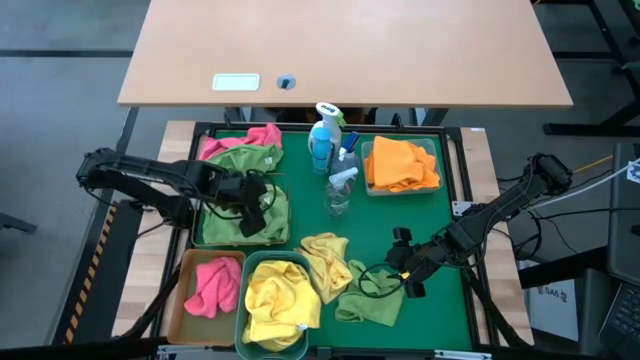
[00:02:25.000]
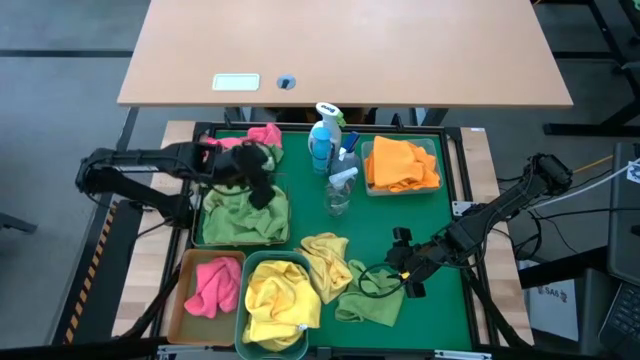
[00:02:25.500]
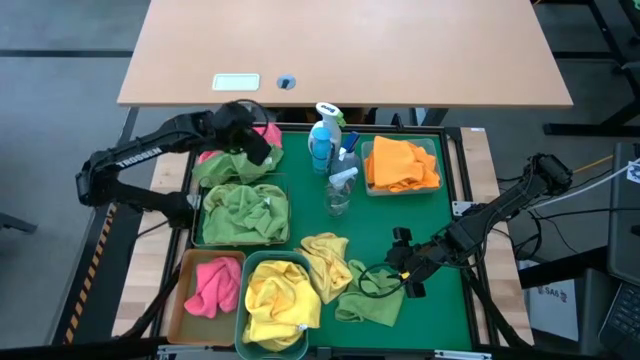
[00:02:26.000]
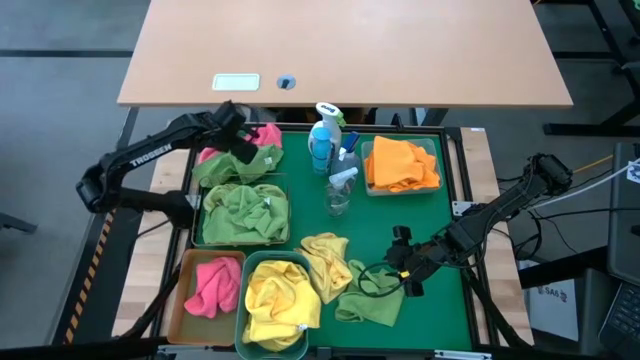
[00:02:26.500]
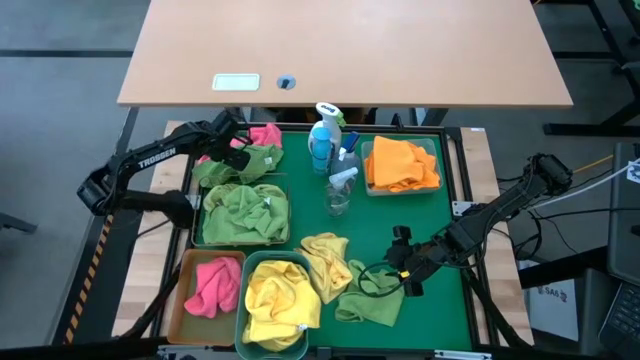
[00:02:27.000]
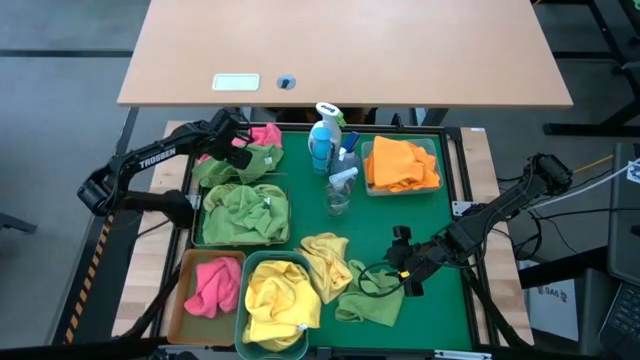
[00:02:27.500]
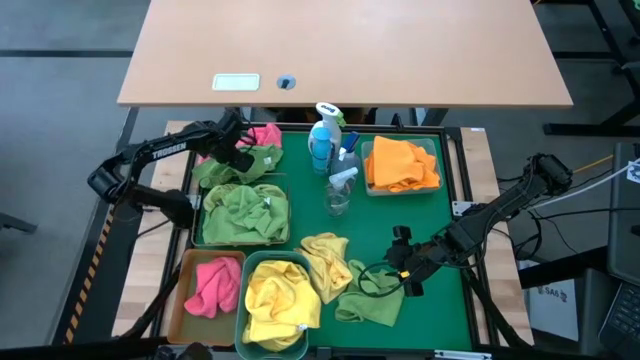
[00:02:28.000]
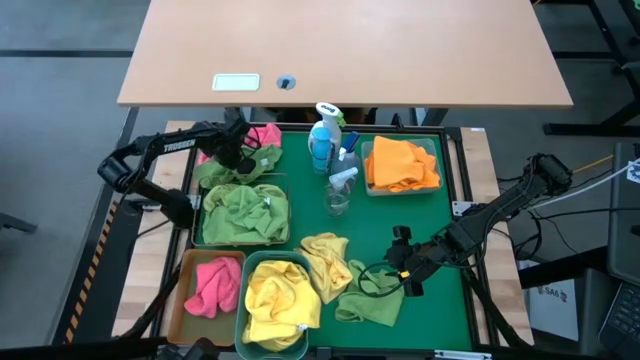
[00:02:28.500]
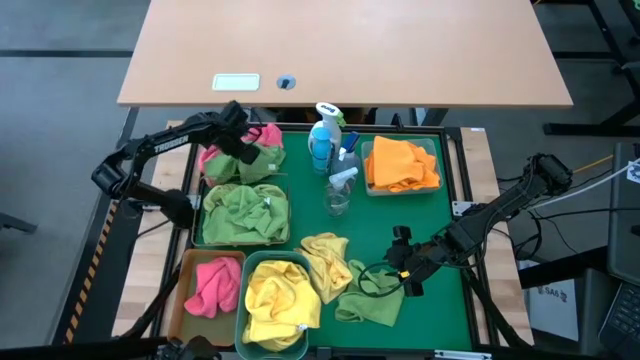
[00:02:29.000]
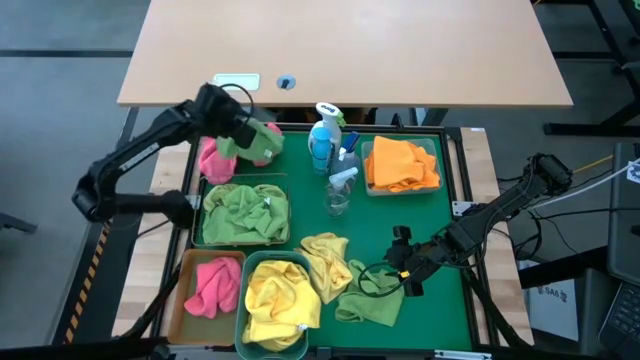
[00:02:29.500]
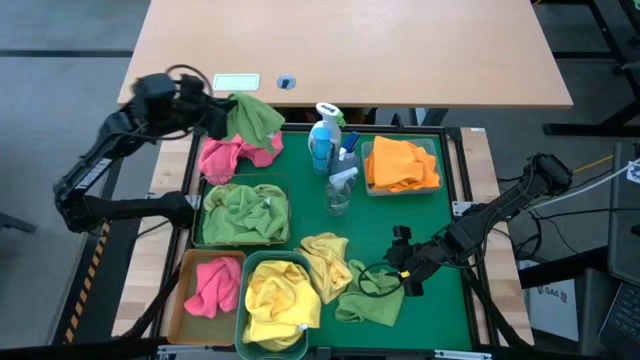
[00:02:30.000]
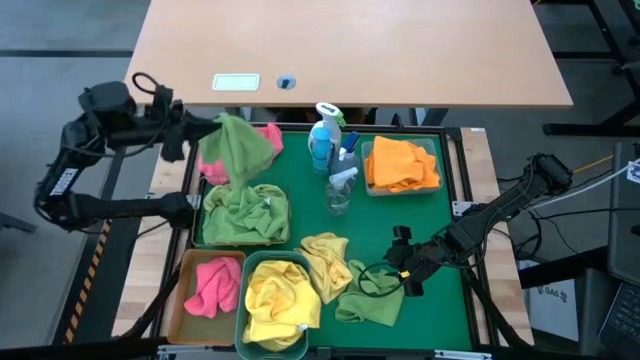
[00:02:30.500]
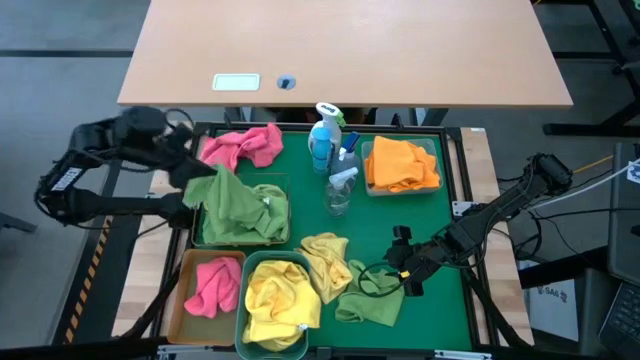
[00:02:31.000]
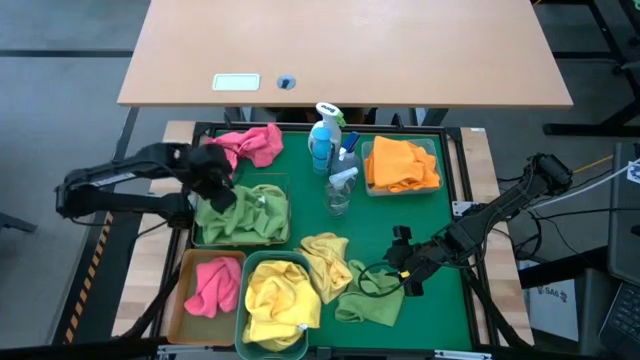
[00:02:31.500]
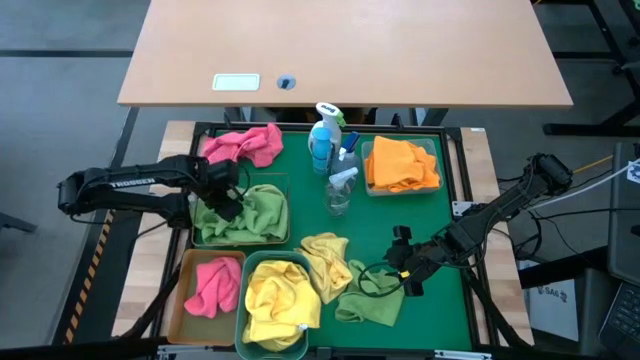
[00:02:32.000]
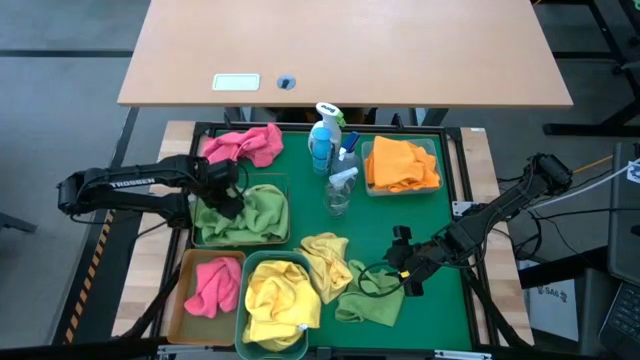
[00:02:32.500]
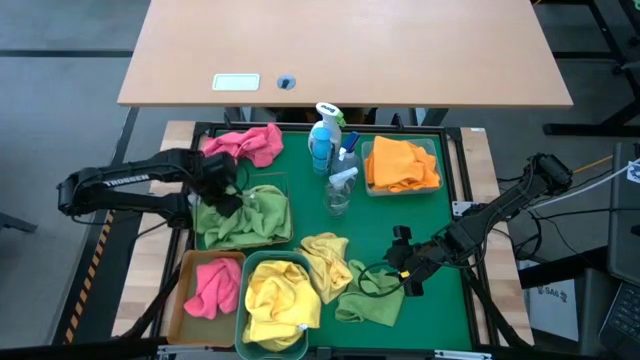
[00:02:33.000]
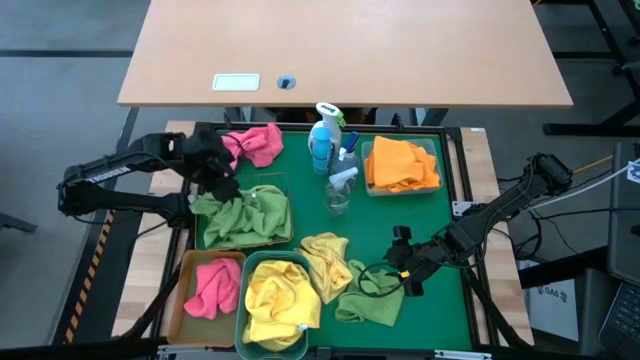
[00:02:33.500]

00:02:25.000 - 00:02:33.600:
Task: Sort microfiber towel by color & place in baskets
Put the green towel into the wire basket

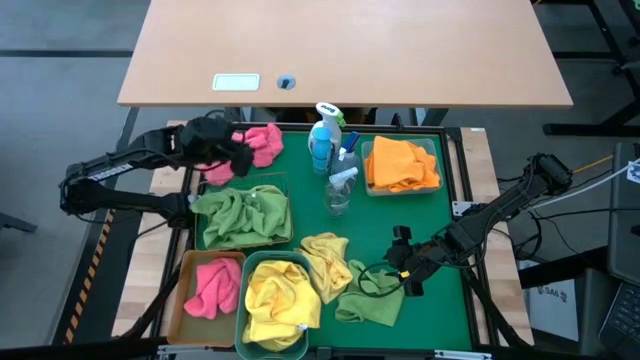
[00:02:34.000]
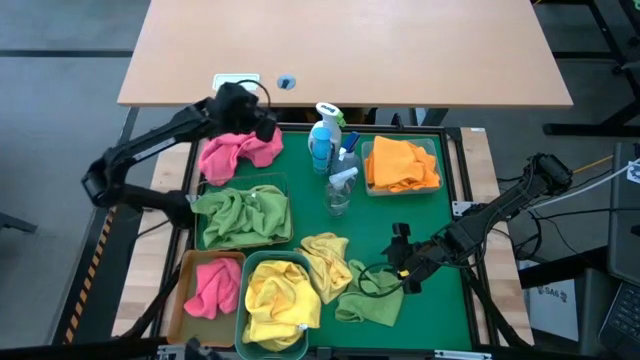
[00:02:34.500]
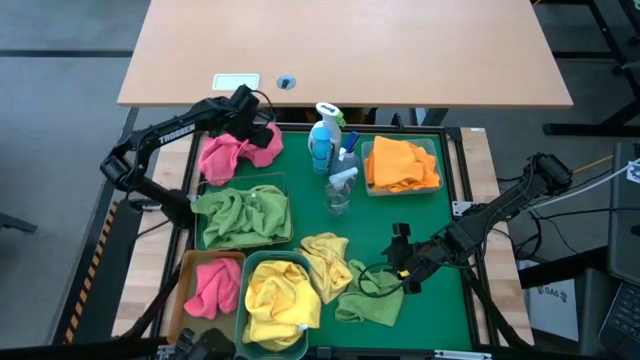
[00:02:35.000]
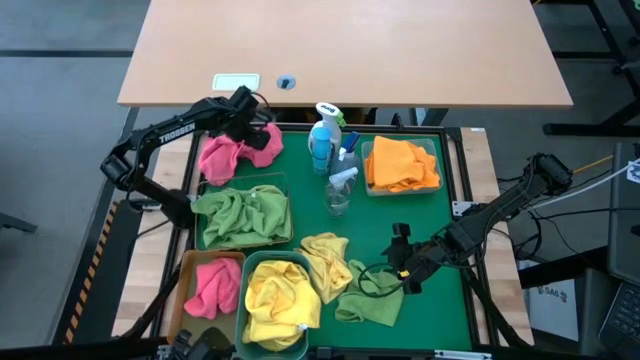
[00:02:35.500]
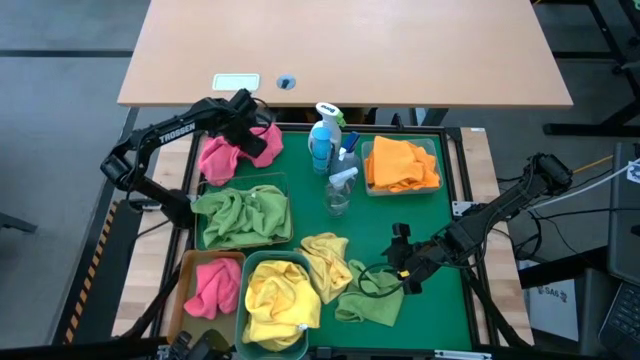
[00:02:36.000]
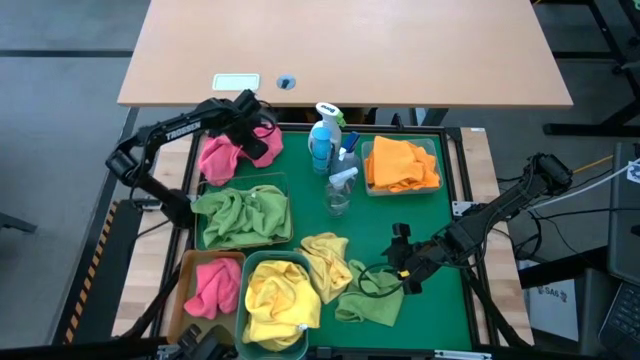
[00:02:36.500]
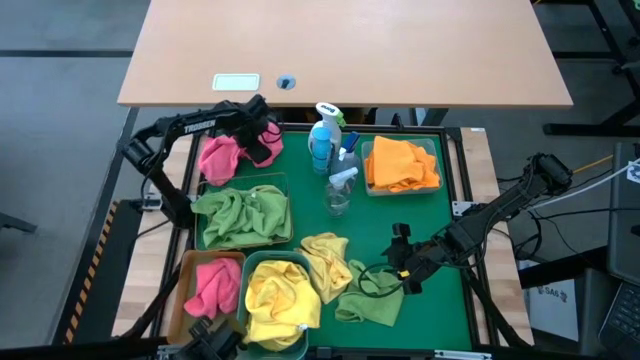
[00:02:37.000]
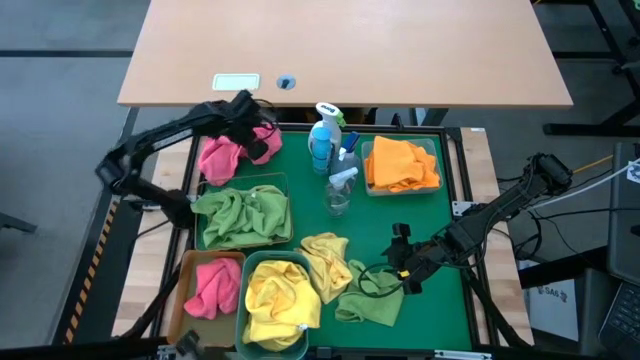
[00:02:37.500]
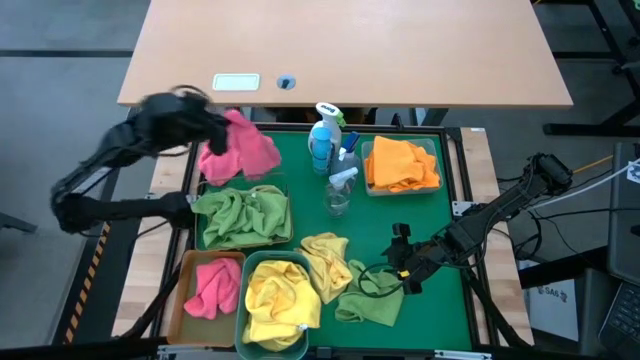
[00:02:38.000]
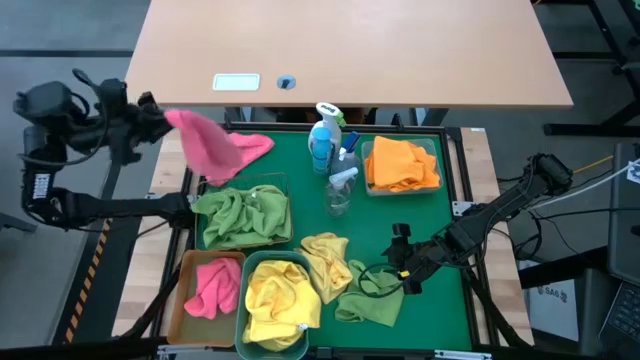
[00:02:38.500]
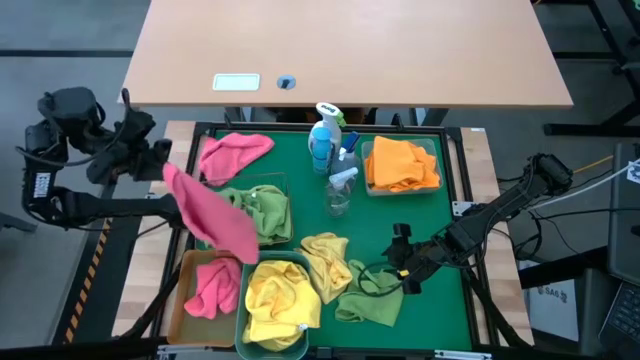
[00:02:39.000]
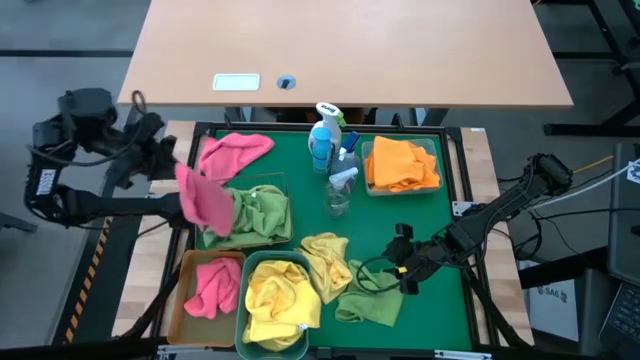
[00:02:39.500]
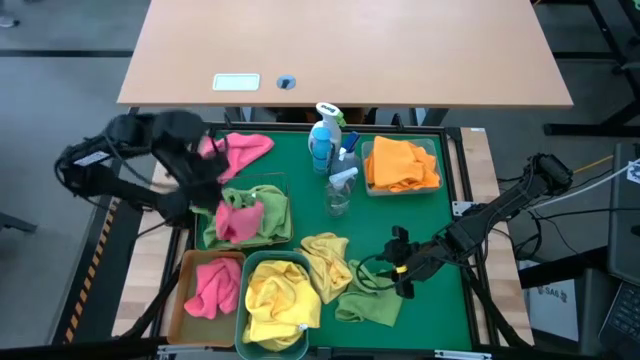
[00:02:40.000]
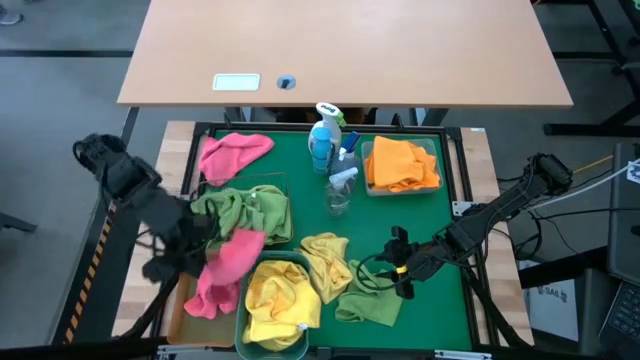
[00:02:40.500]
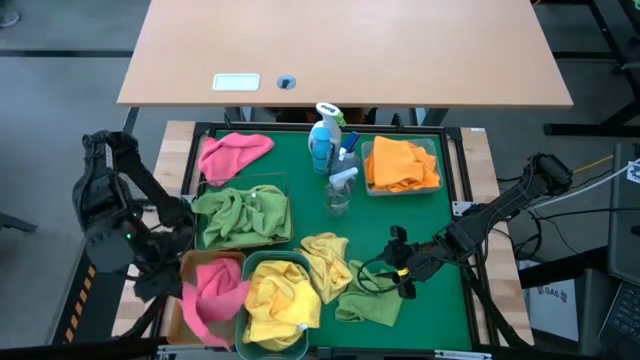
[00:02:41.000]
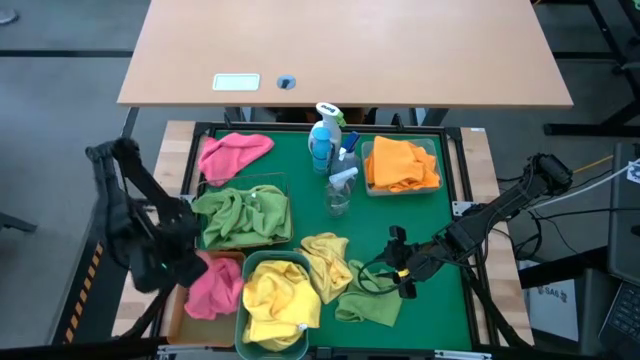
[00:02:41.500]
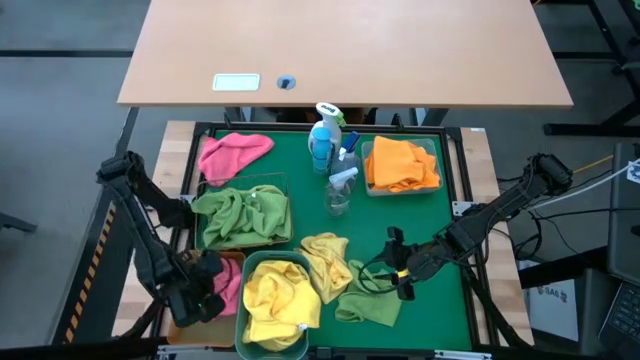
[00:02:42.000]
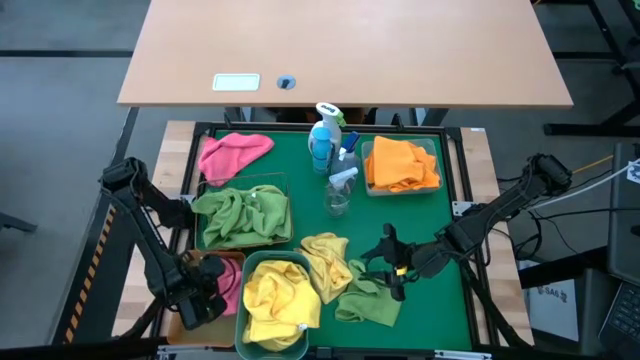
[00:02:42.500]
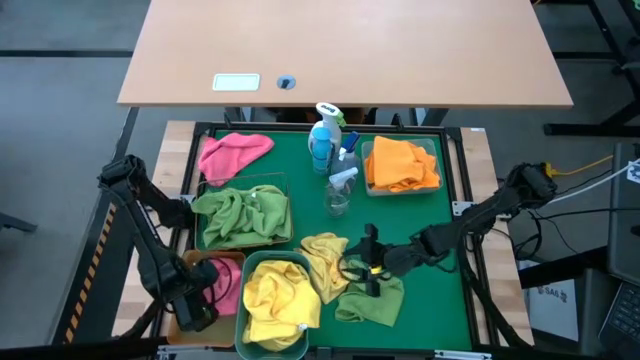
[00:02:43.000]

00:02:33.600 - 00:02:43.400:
Put the pink towel into the orange bin

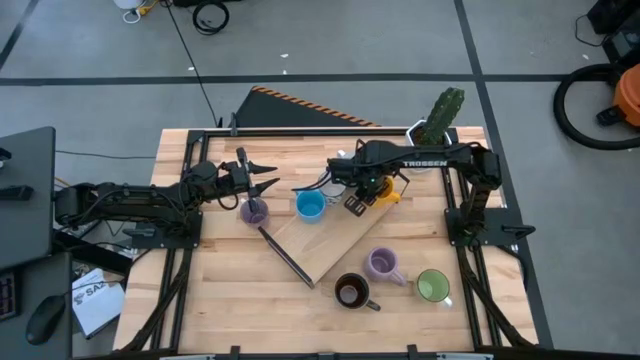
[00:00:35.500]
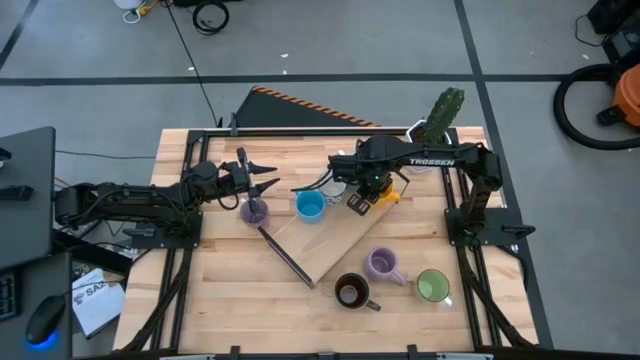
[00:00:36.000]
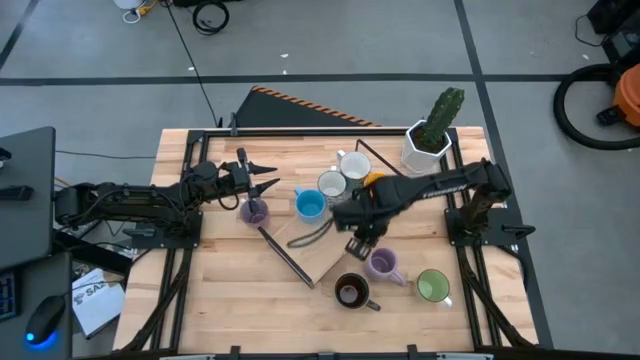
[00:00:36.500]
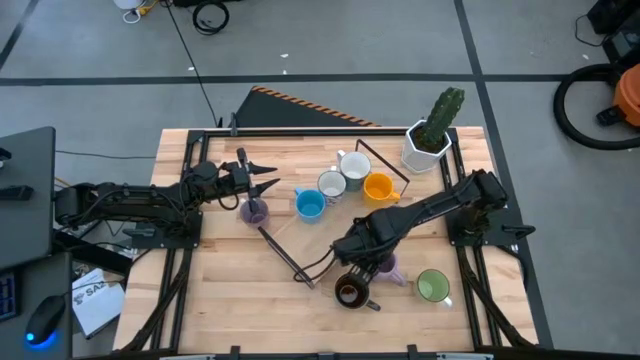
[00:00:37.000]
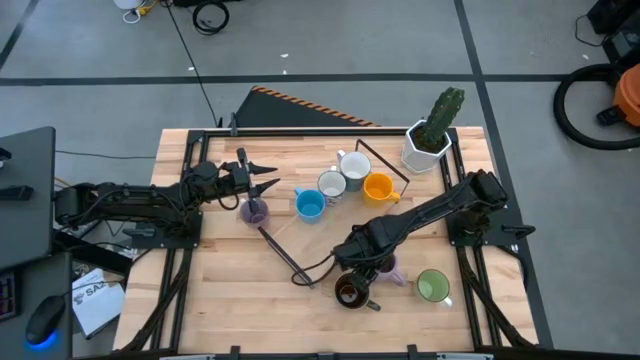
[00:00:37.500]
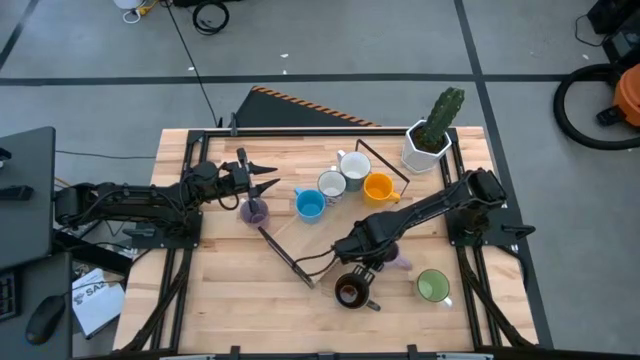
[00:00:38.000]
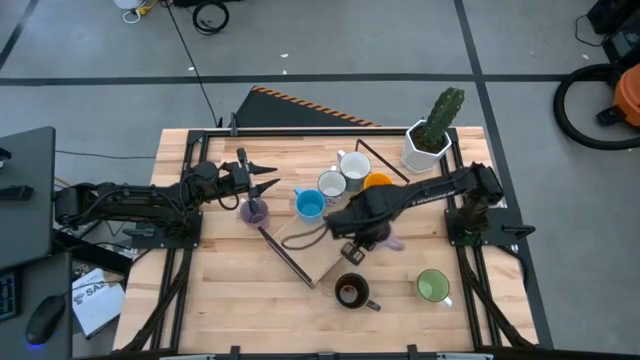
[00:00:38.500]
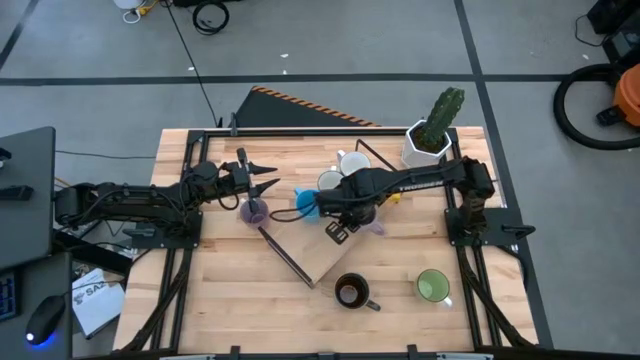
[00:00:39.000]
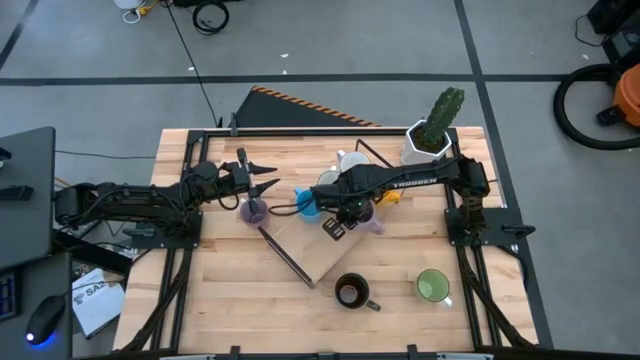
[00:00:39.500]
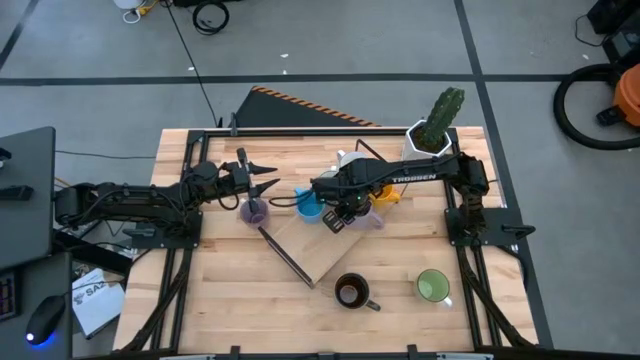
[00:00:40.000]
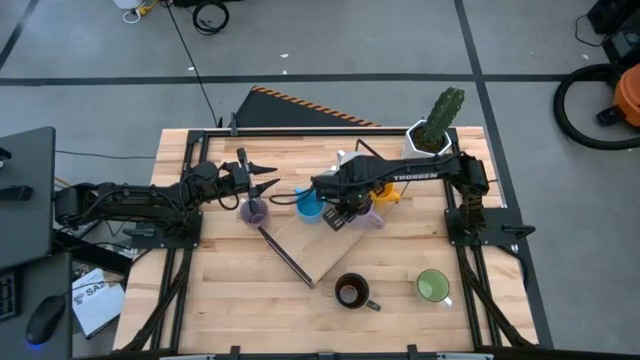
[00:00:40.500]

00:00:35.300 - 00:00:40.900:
Task: Place coffee mugs
Put the small purple mug on the shelf
